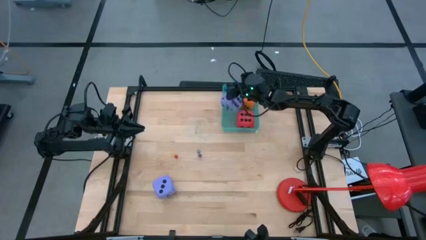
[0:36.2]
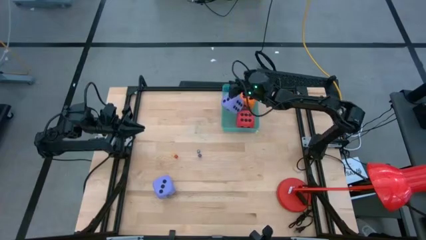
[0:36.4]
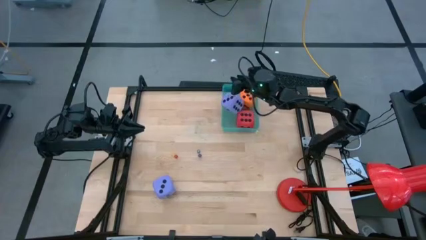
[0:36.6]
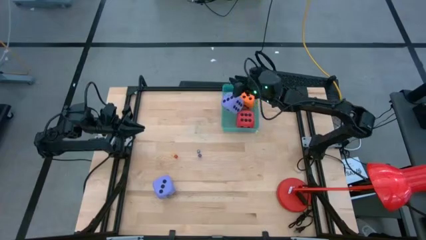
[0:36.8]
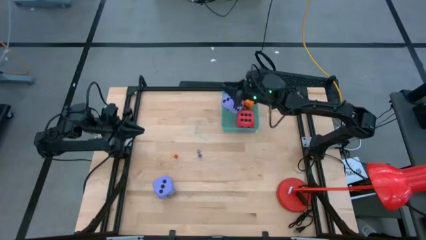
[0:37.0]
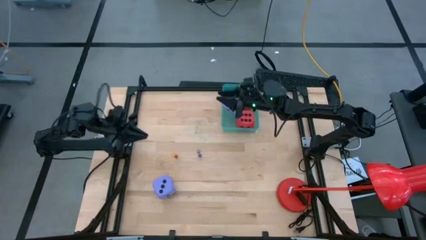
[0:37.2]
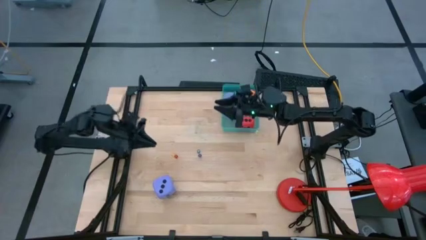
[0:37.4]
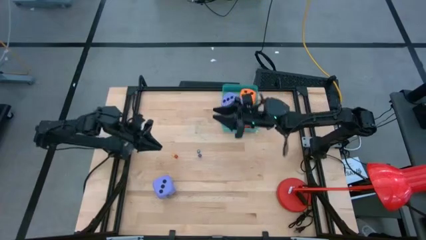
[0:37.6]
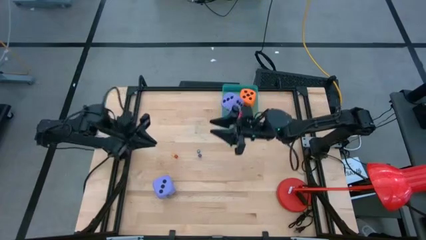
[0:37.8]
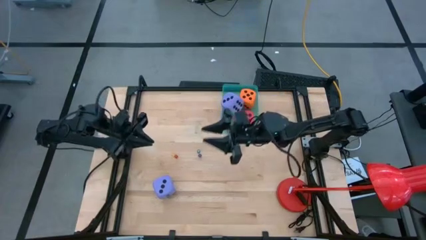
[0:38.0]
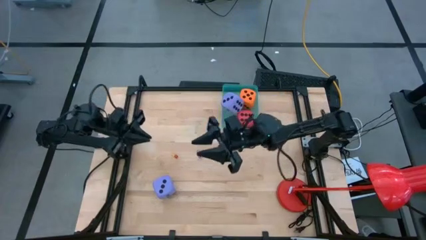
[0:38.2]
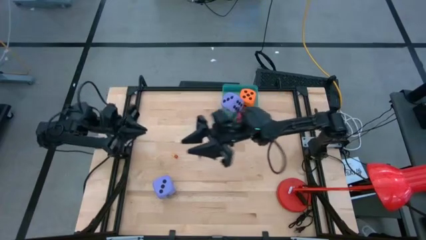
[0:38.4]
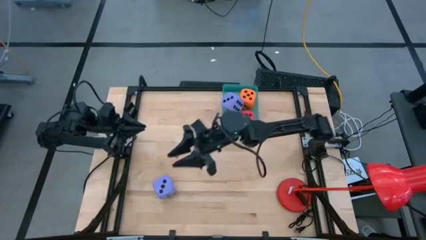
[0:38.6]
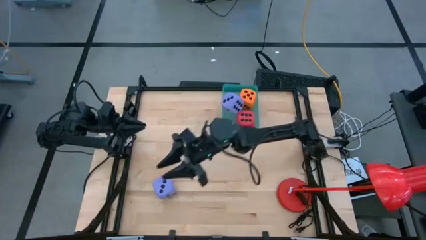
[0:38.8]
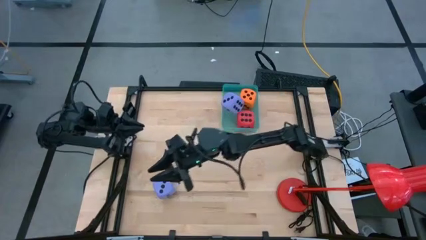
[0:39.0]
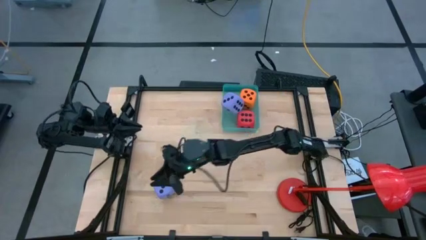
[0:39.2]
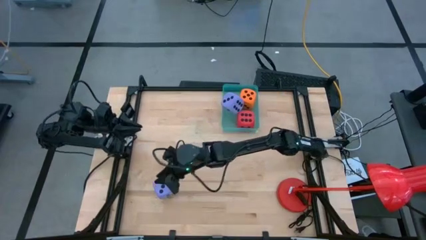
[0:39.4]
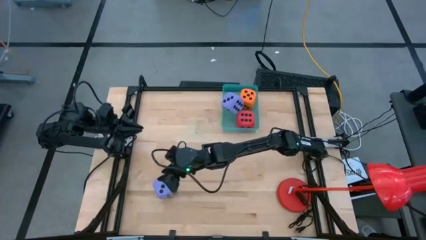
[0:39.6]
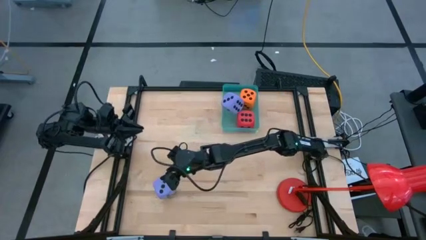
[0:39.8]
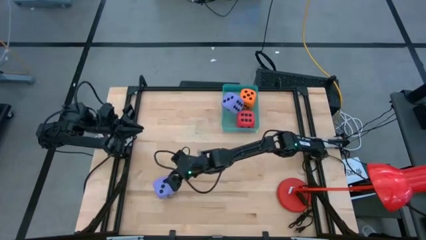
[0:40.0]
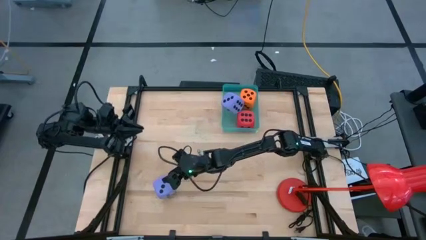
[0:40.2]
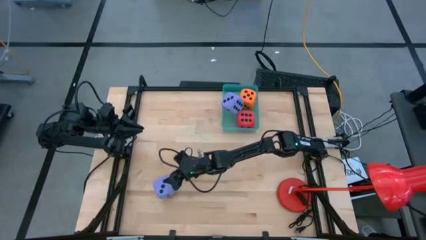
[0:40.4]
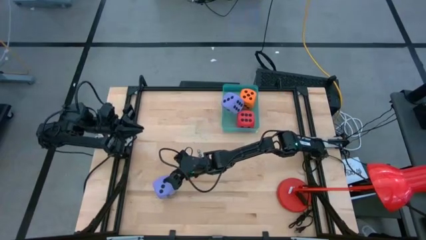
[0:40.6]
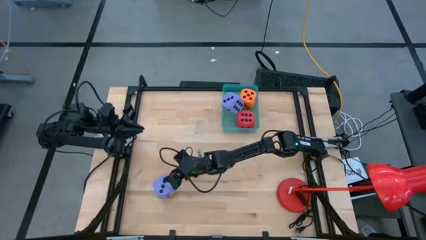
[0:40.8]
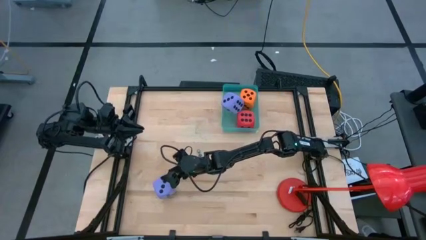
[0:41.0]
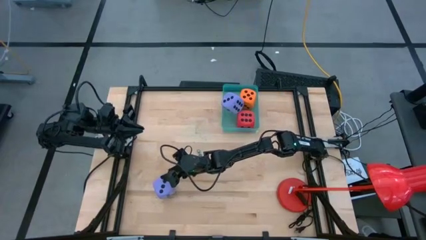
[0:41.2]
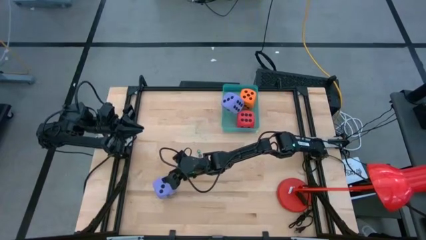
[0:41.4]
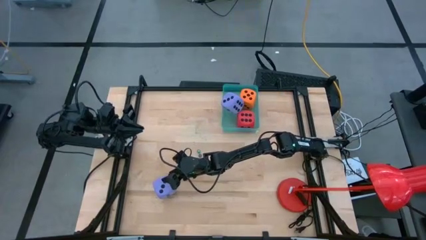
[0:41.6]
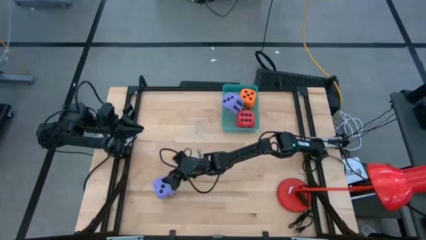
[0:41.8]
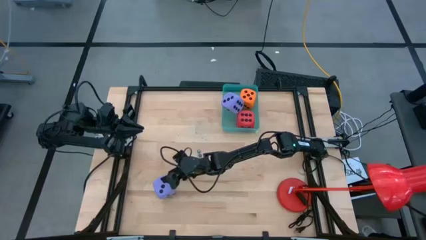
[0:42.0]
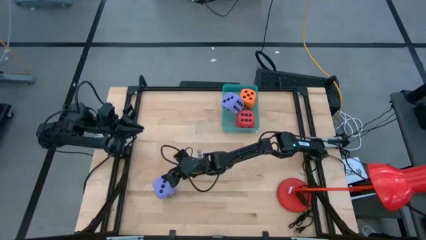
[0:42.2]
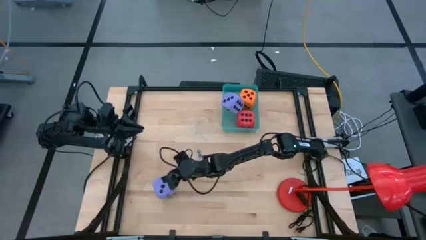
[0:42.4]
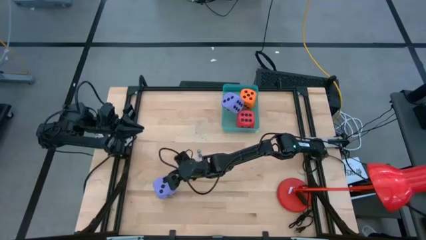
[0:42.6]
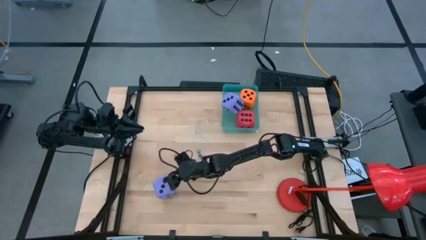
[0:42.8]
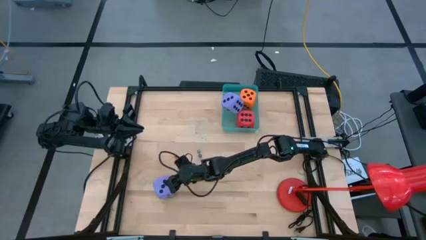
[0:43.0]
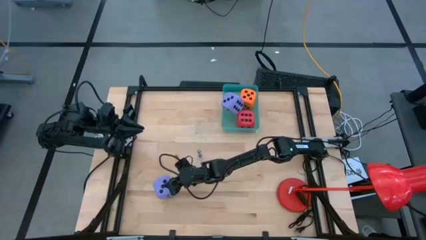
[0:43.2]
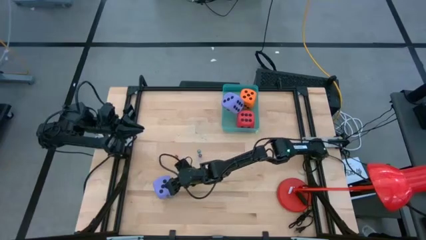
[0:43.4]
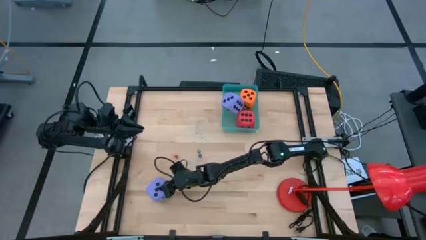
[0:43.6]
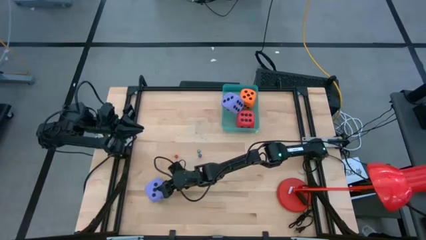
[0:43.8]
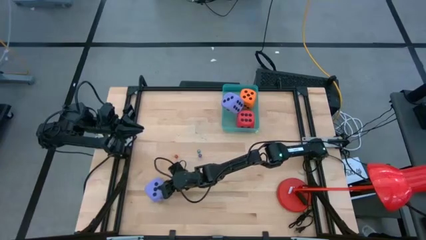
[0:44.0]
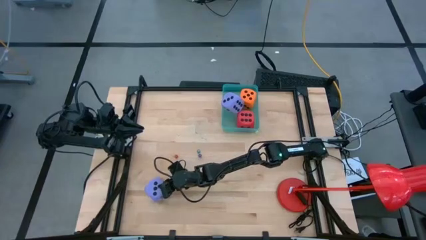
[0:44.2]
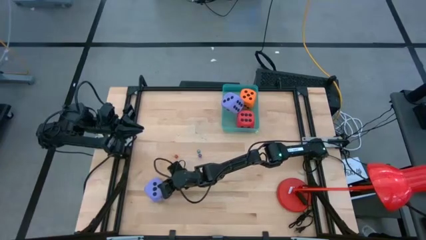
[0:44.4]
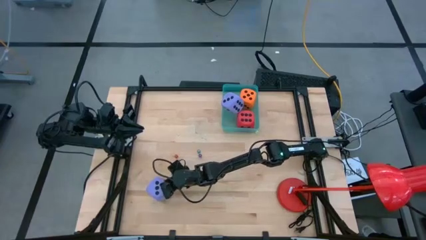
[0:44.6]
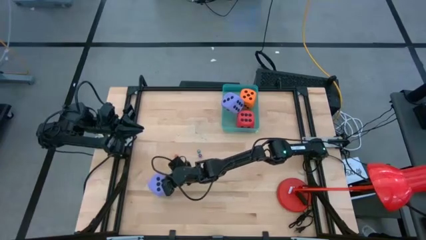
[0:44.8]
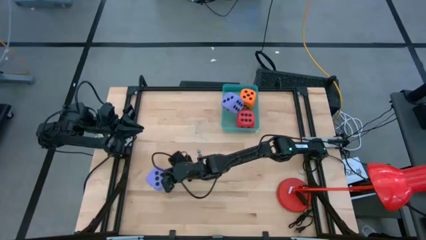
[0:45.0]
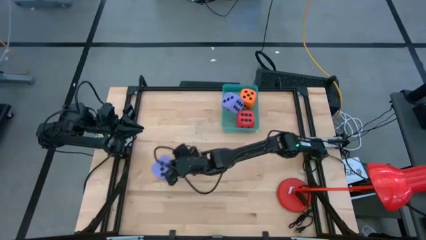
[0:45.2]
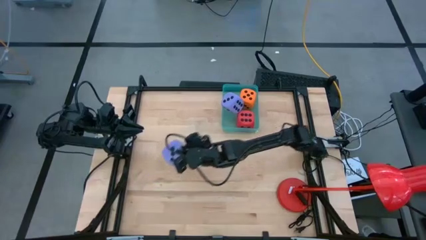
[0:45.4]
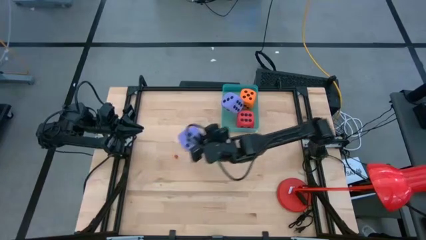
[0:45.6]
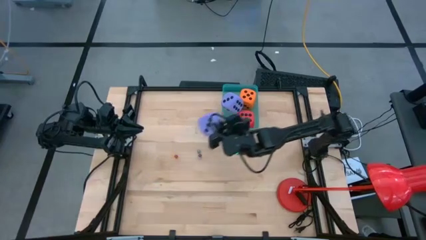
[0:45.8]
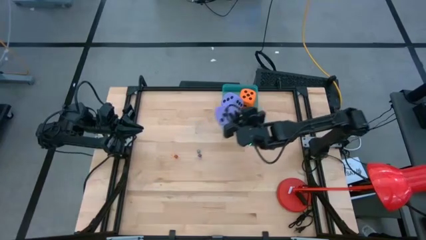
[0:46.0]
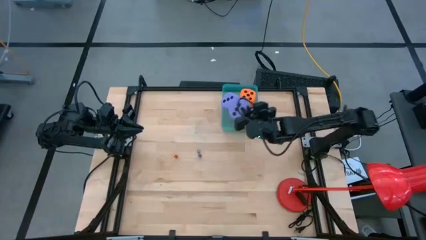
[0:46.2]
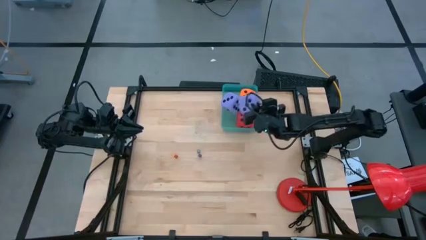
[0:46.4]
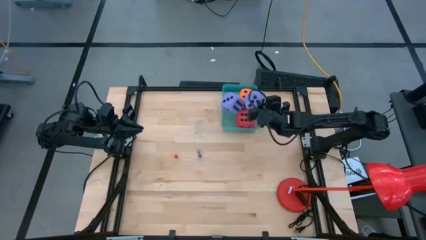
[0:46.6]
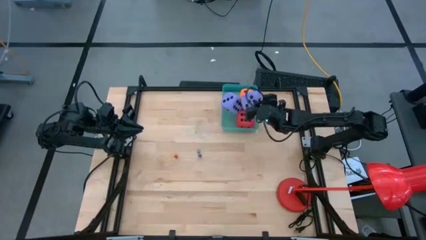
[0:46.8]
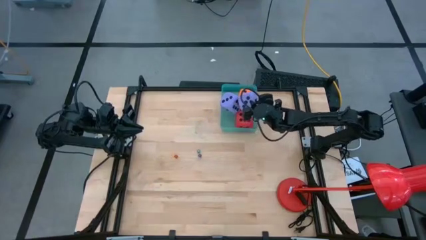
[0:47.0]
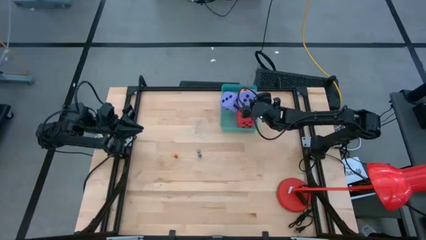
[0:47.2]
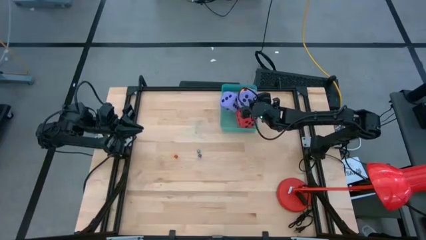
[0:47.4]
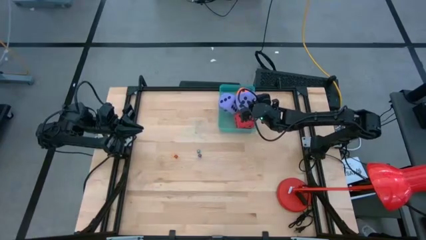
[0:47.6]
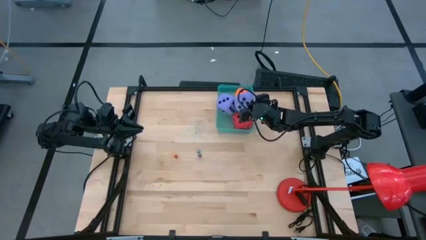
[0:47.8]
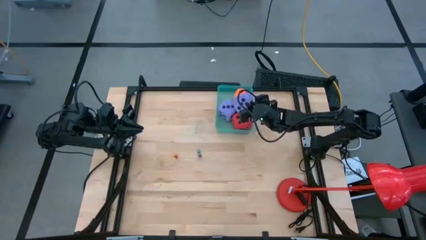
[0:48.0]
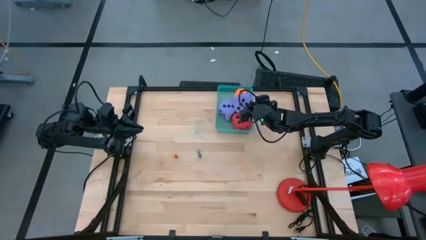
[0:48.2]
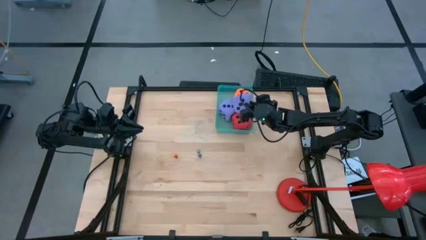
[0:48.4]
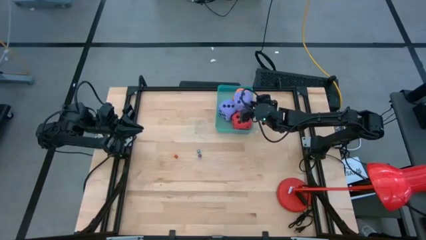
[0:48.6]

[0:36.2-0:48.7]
Task: Pick & Place Dice
Put the large purple die into the green bin
